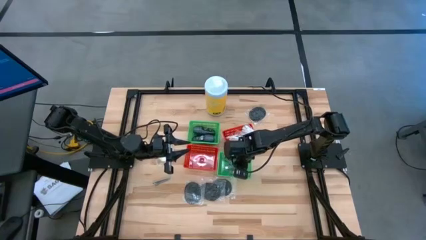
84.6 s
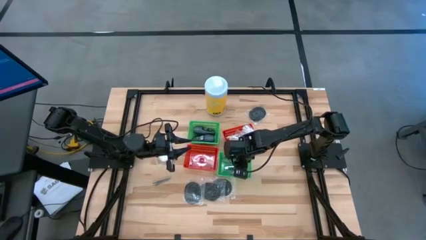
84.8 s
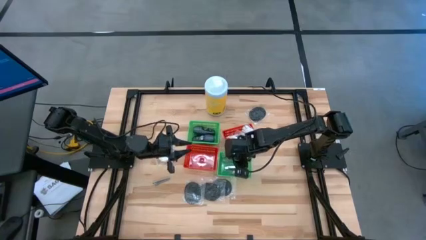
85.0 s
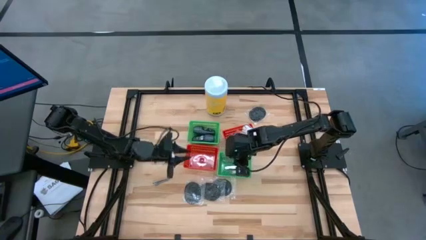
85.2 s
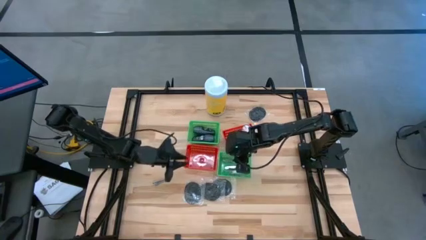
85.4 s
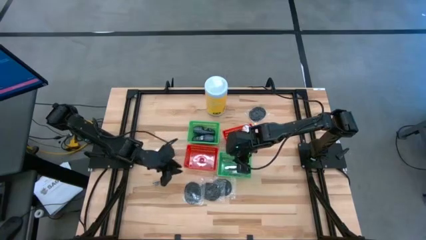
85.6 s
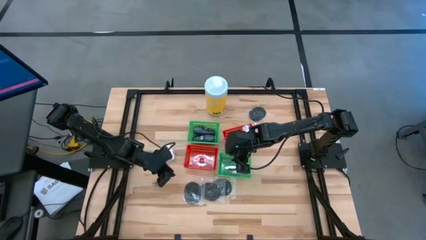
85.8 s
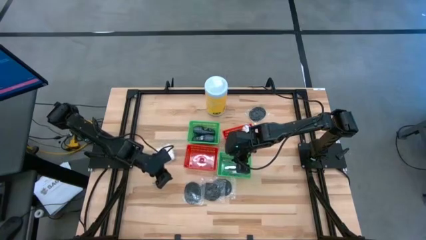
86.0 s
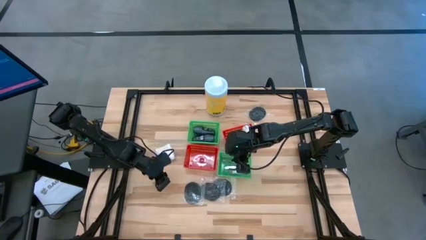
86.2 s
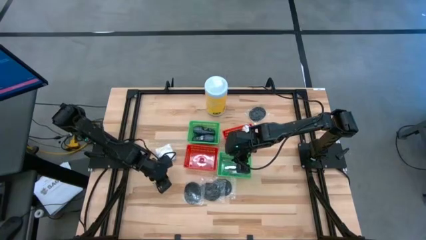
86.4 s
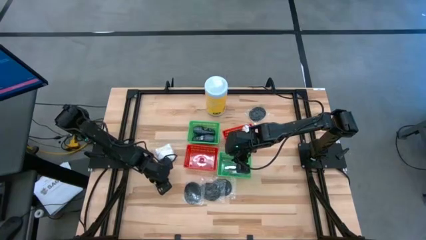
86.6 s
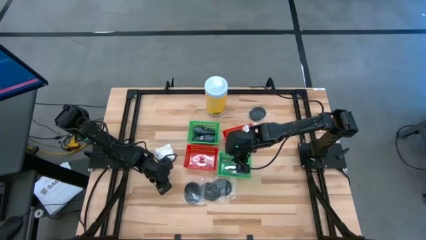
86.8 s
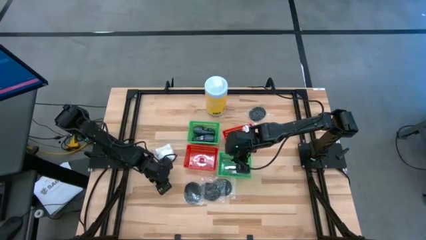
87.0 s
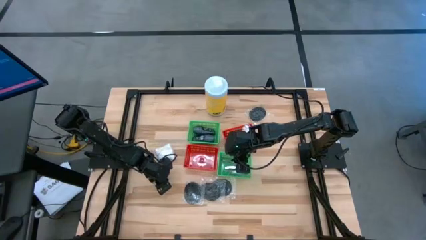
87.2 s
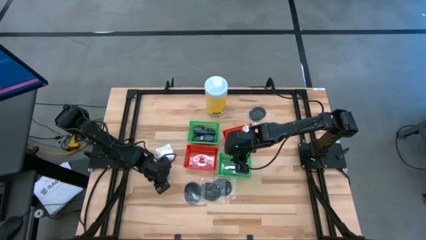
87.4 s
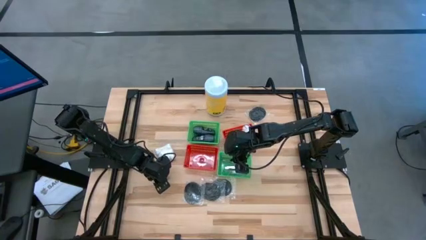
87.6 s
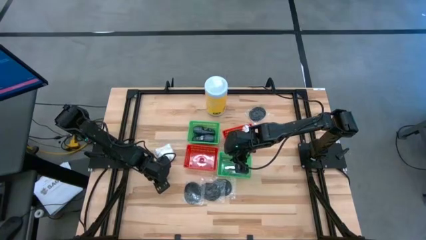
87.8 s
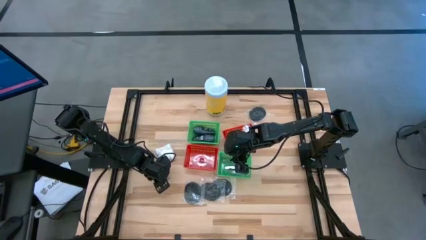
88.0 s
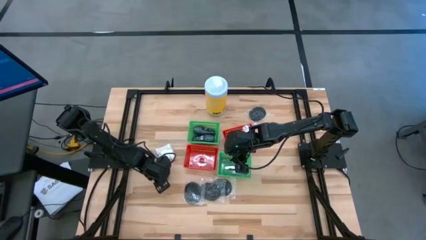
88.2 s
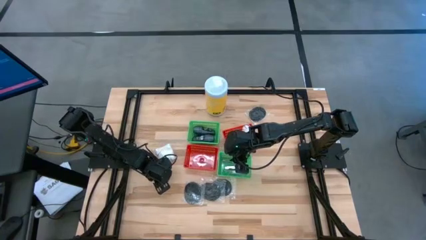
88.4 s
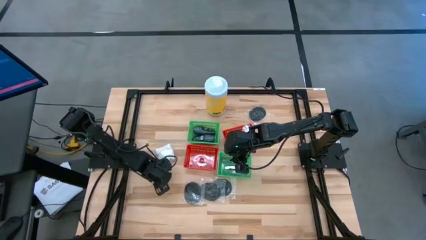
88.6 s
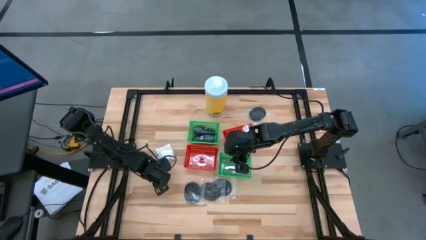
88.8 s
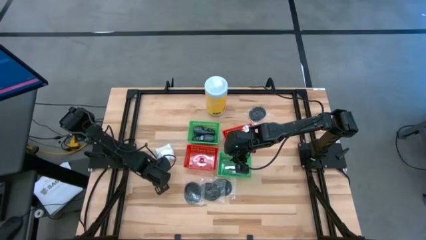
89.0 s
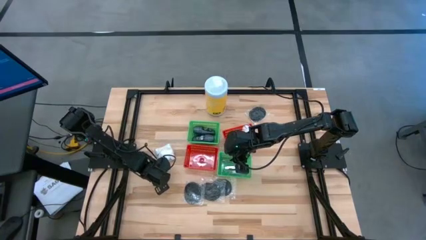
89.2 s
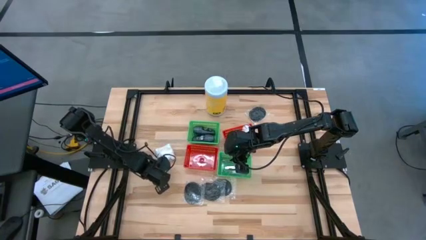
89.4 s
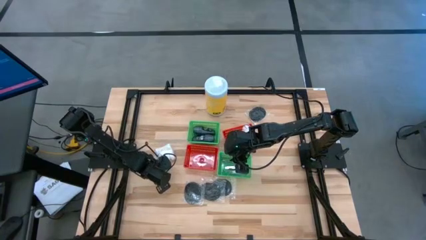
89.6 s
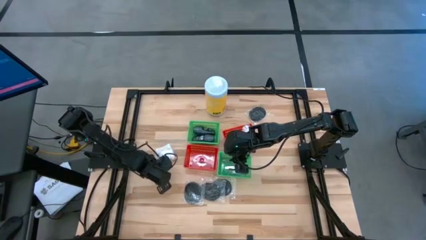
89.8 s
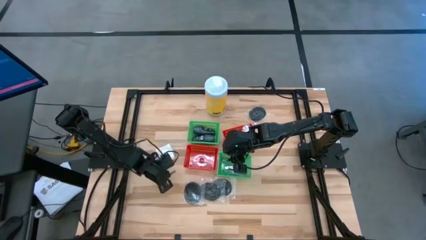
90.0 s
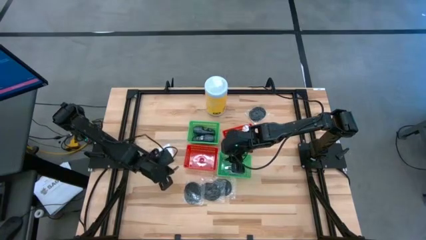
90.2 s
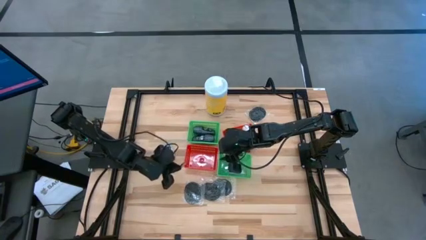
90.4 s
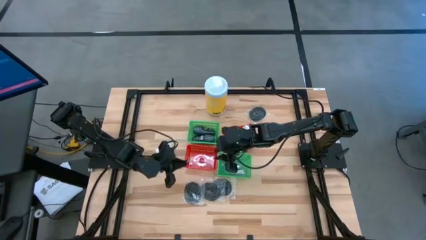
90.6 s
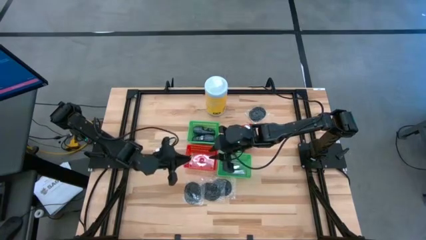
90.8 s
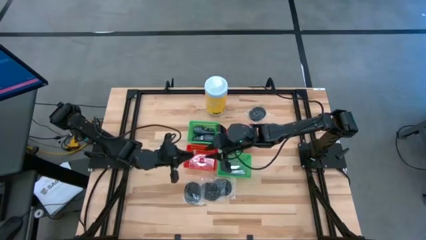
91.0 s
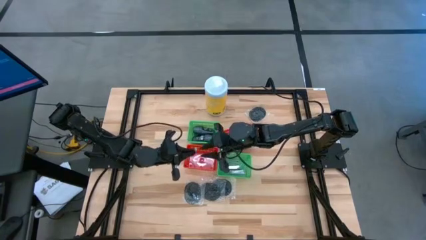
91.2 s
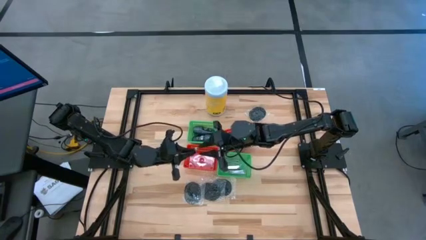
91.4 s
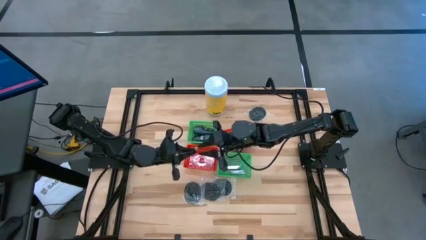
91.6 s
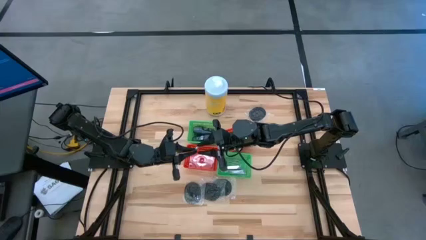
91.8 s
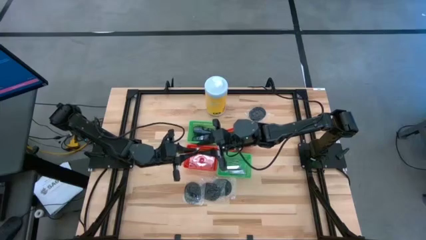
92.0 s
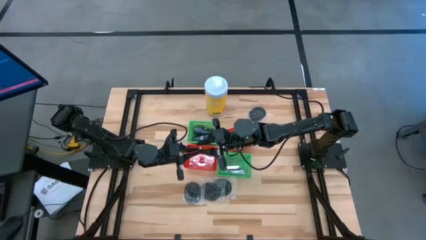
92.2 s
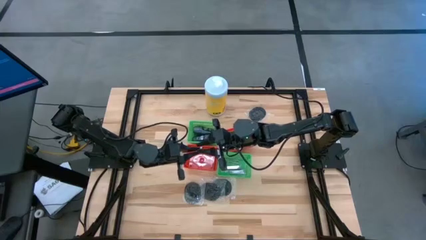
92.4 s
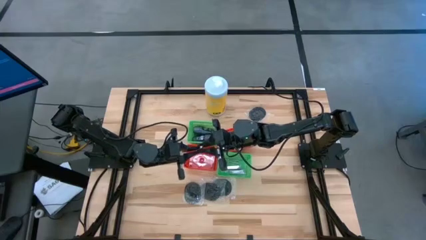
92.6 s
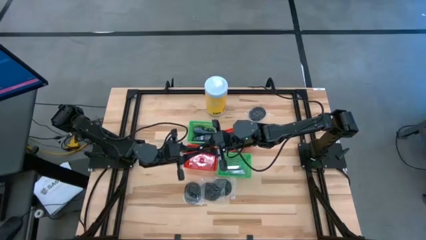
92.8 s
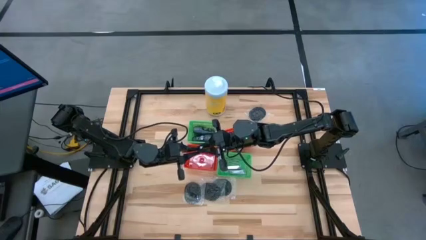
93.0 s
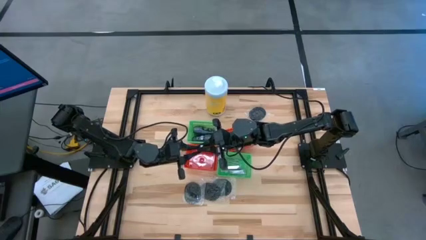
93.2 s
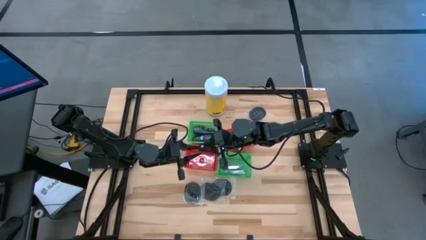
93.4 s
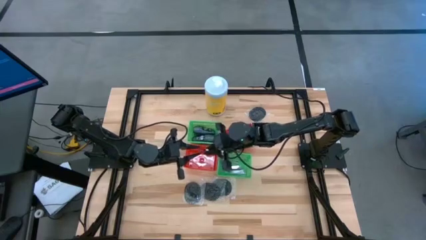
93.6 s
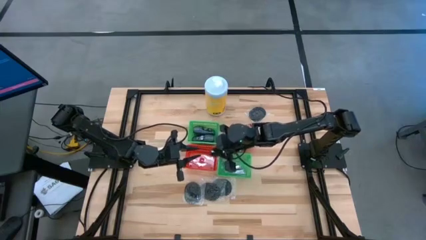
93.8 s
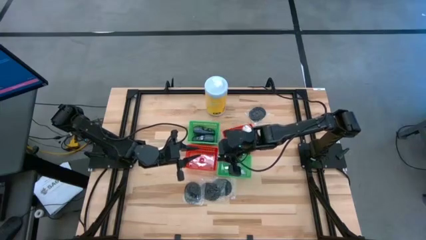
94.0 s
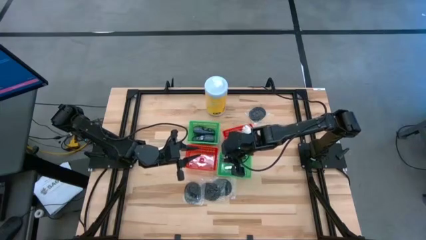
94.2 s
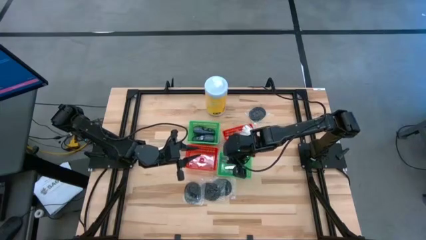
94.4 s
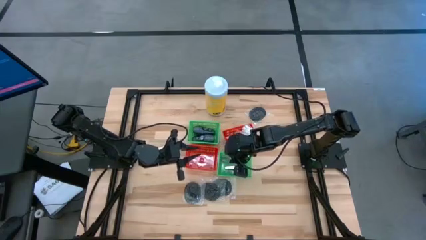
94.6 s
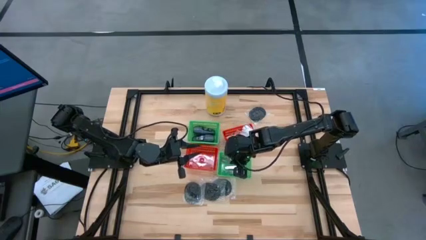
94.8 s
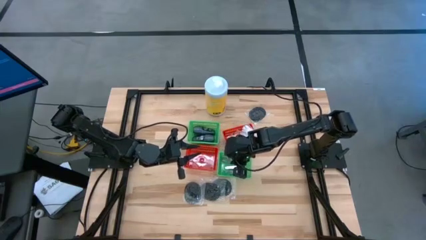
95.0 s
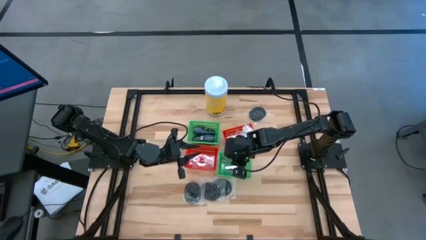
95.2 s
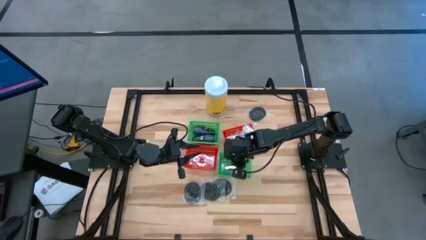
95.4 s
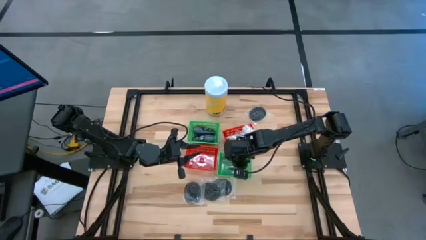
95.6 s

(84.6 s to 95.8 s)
Task: Pick & Place Travel size toiletries
Put the nail cutter into the right green bin

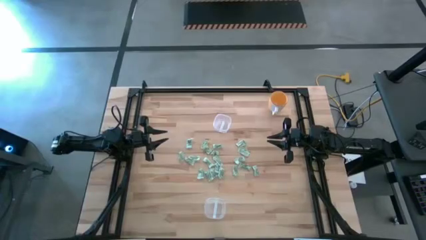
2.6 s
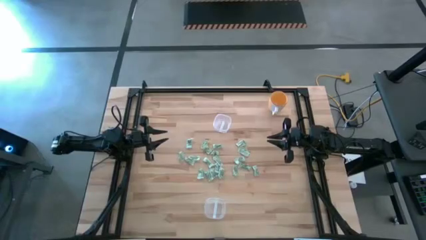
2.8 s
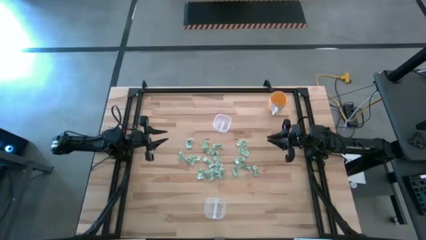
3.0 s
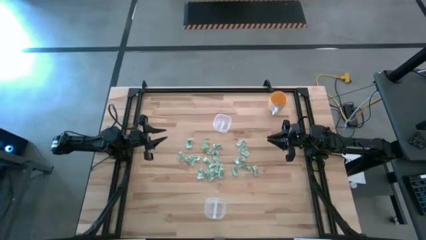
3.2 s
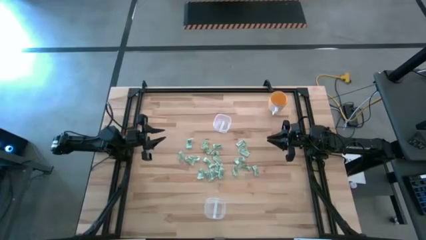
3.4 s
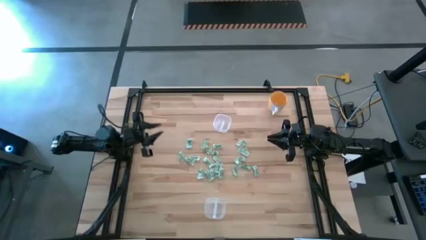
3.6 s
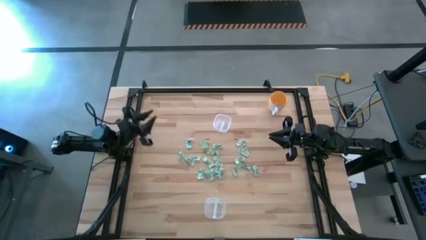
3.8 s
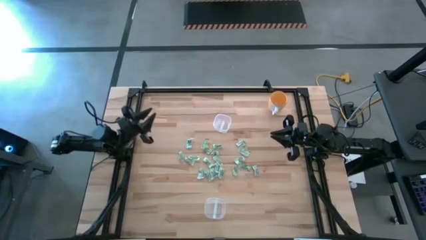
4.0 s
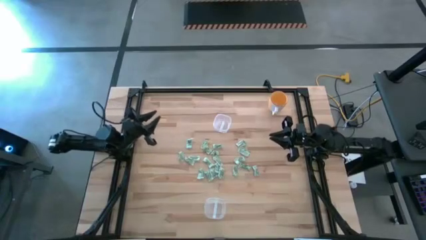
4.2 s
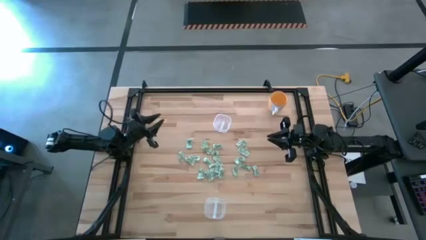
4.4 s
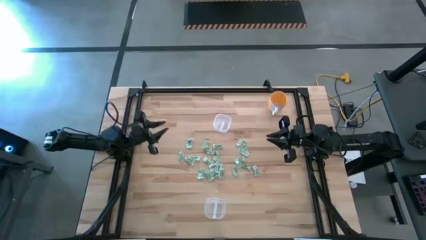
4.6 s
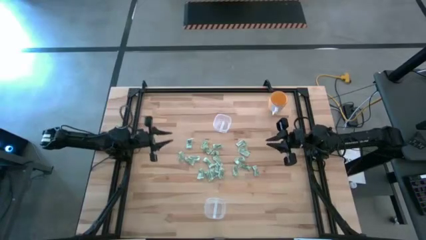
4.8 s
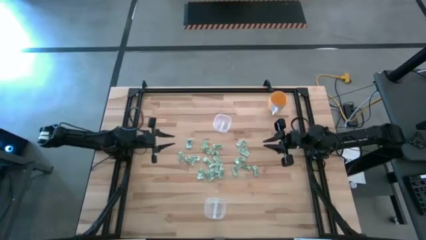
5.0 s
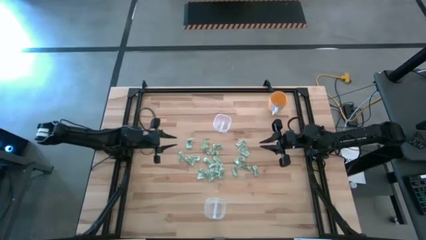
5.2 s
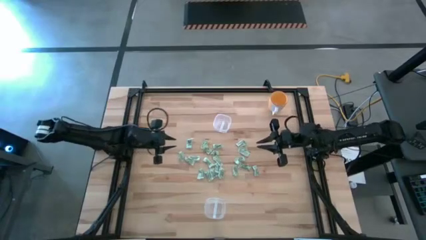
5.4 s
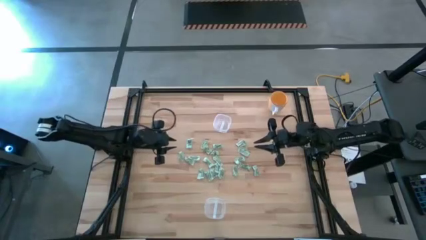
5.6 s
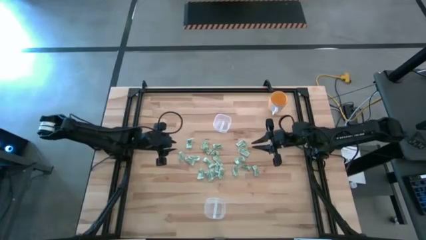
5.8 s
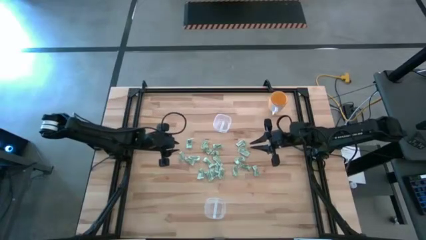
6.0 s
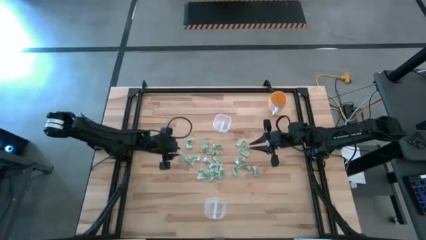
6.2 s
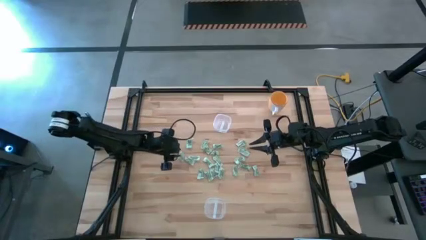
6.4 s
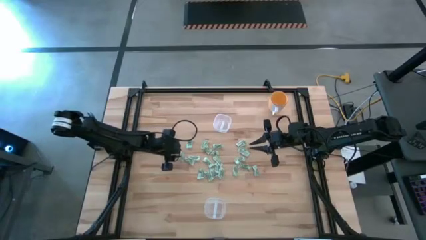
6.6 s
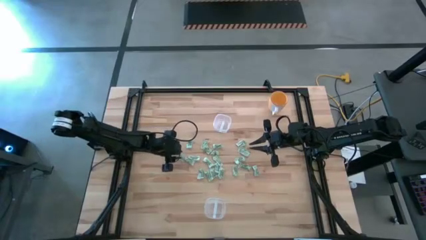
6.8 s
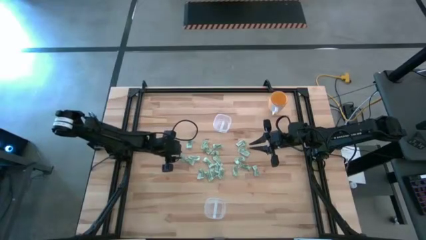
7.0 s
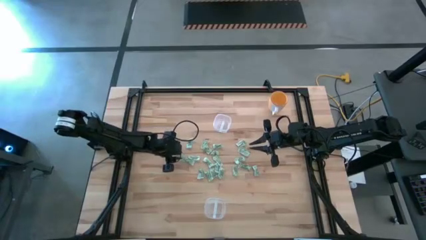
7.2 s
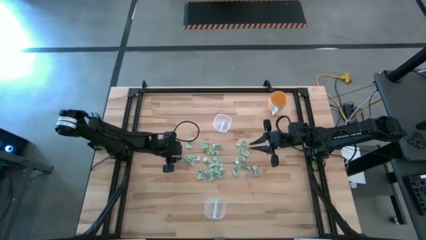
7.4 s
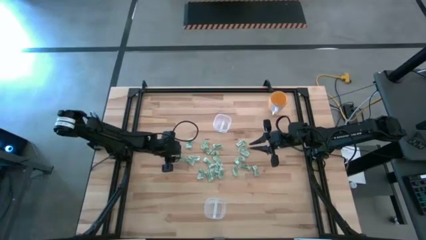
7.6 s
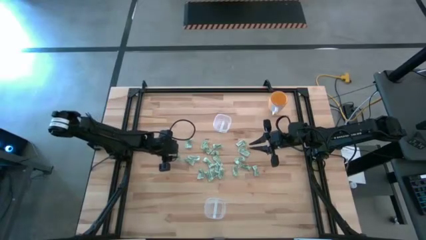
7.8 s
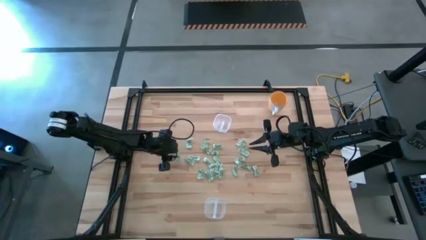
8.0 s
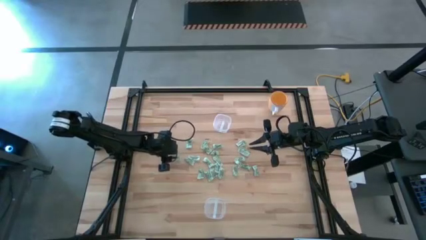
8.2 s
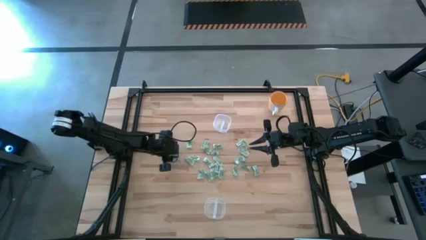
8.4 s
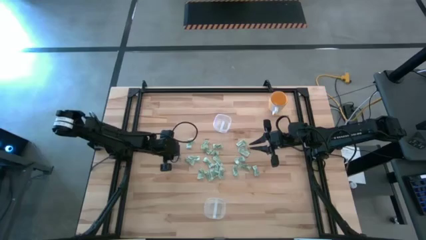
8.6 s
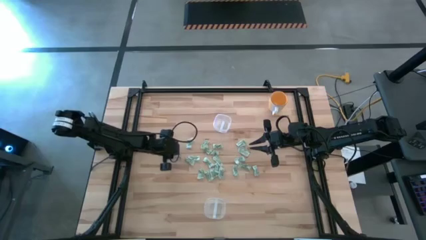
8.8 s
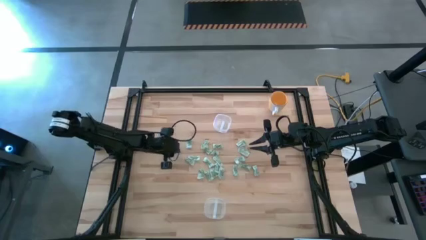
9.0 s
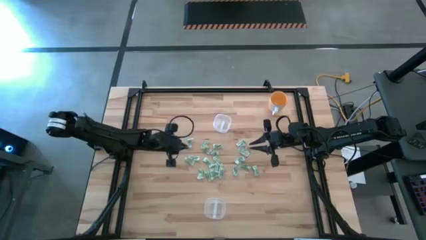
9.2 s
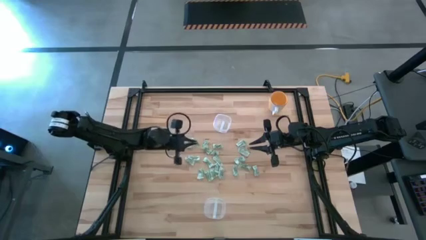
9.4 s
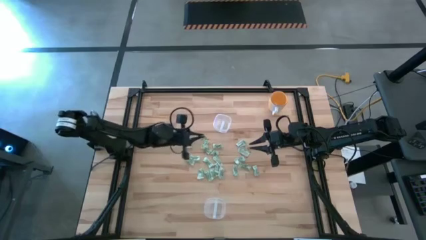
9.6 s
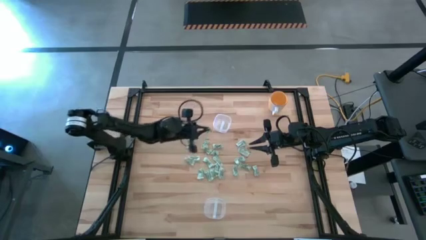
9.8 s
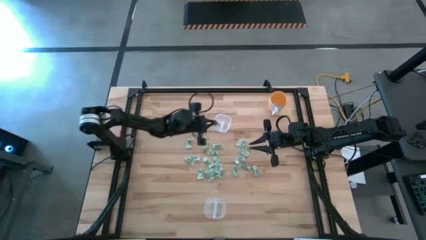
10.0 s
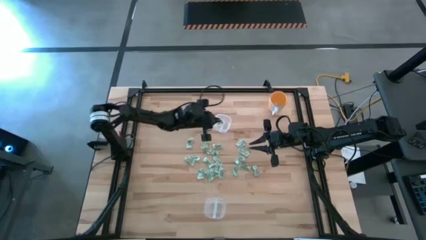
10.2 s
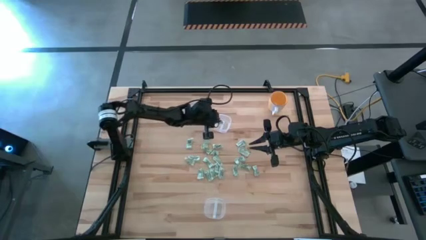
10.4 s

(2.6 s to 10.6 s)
Task: Pick and place items into bin
Put the stevia packet into the top transparent bin
